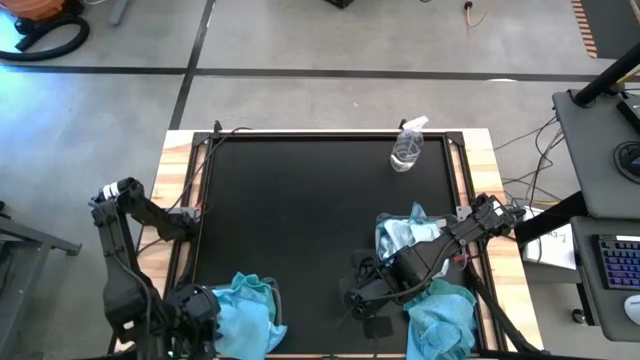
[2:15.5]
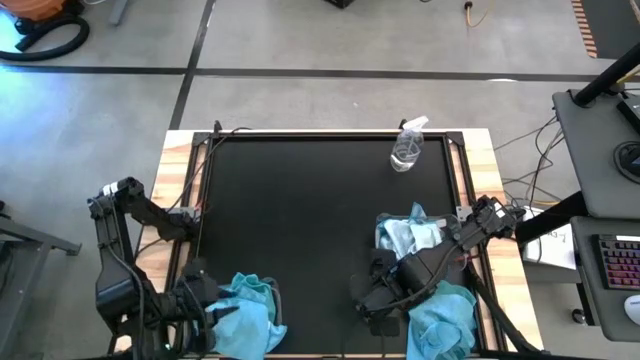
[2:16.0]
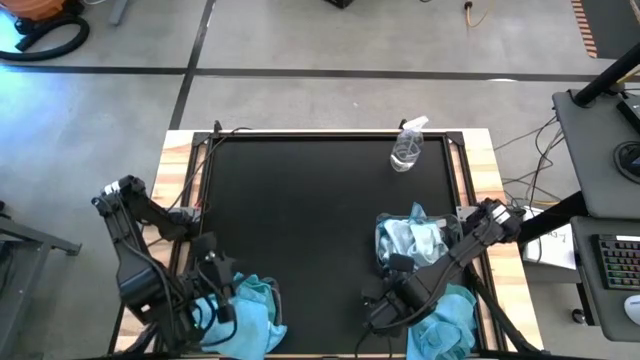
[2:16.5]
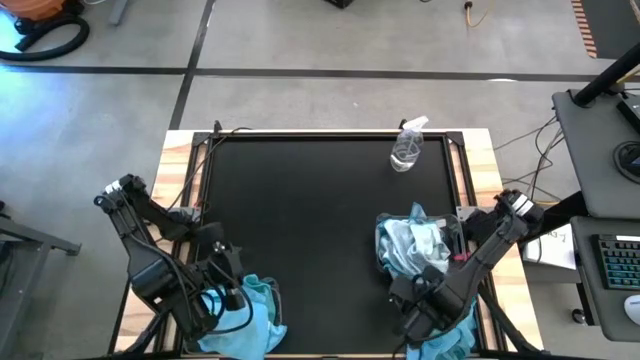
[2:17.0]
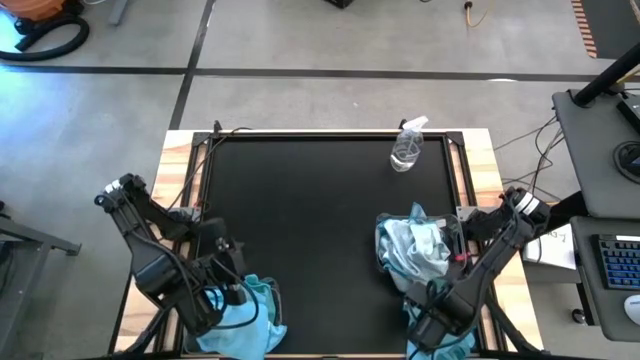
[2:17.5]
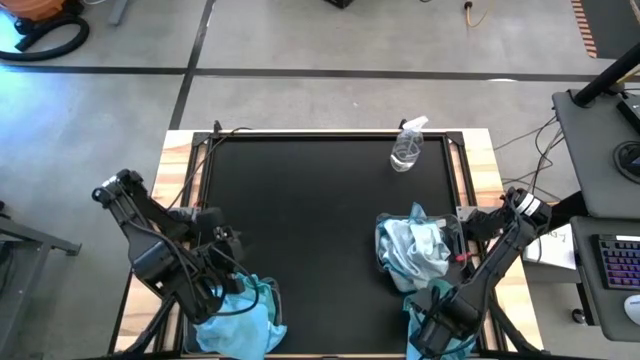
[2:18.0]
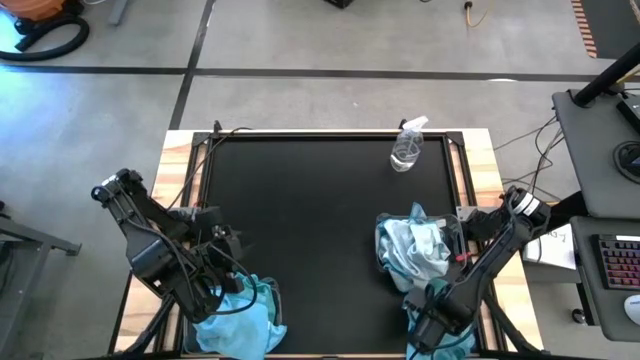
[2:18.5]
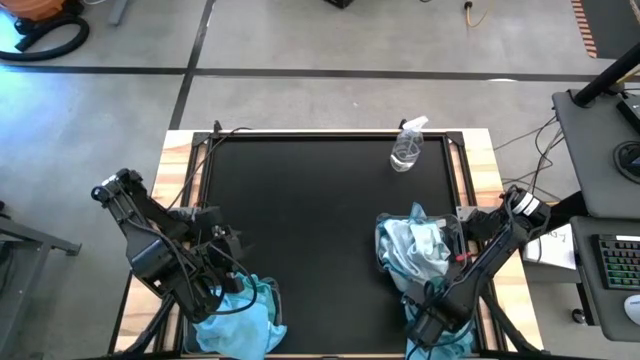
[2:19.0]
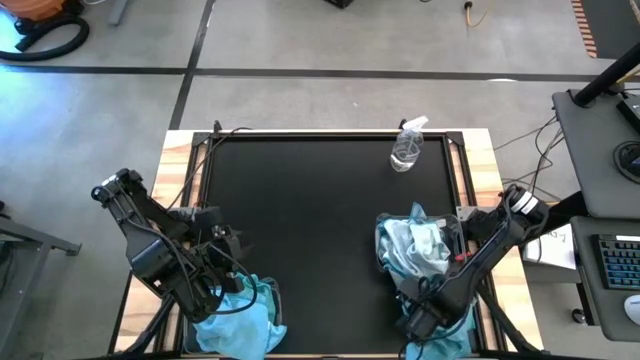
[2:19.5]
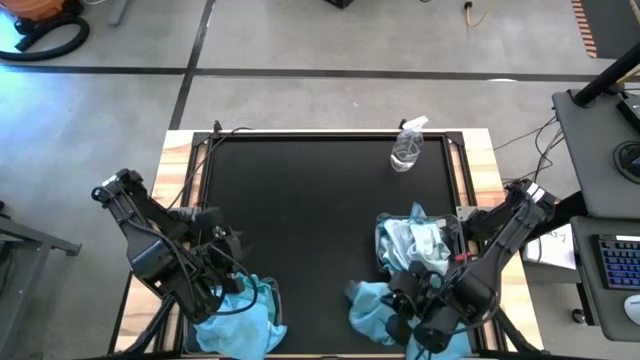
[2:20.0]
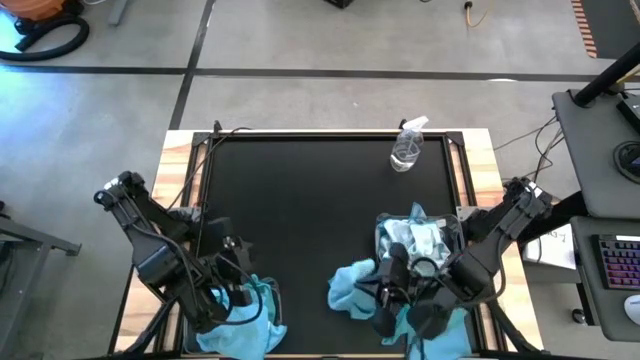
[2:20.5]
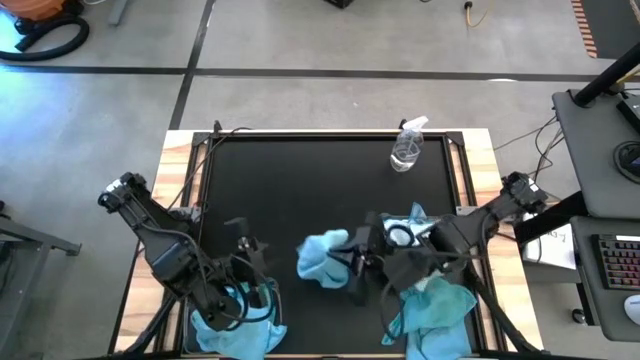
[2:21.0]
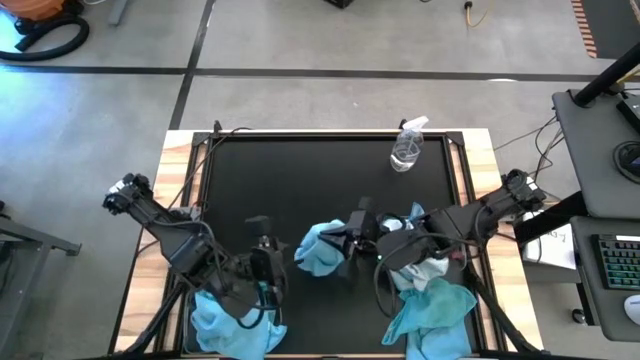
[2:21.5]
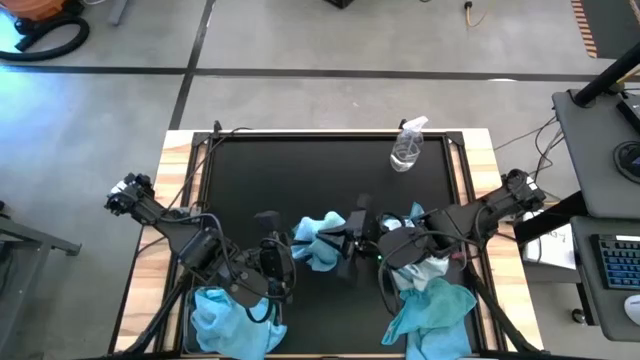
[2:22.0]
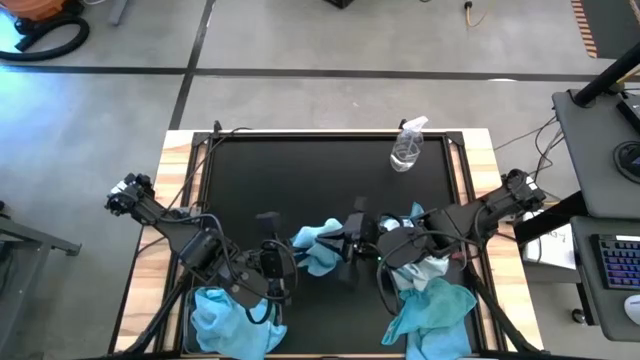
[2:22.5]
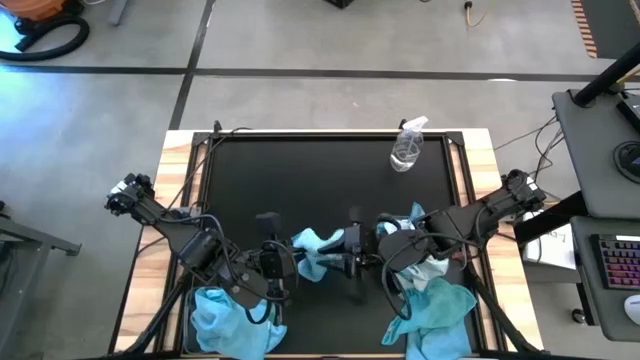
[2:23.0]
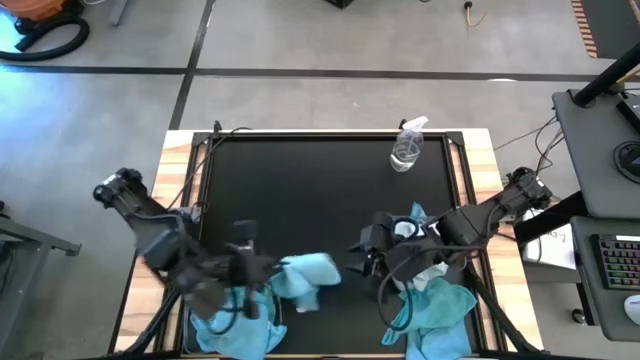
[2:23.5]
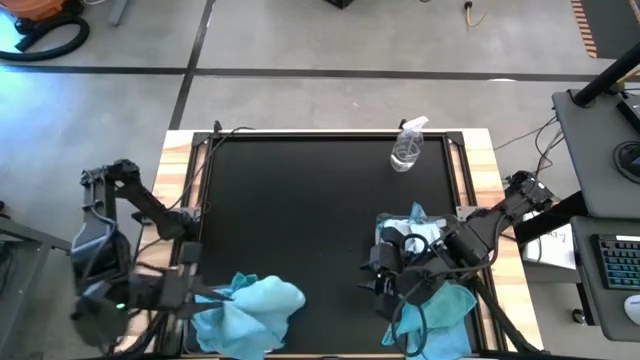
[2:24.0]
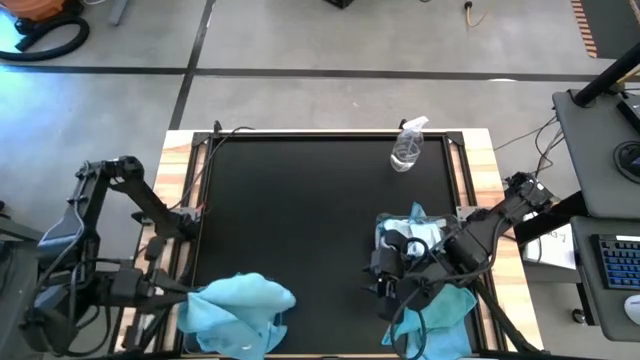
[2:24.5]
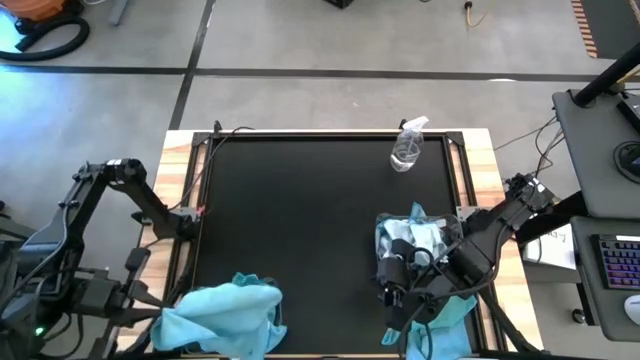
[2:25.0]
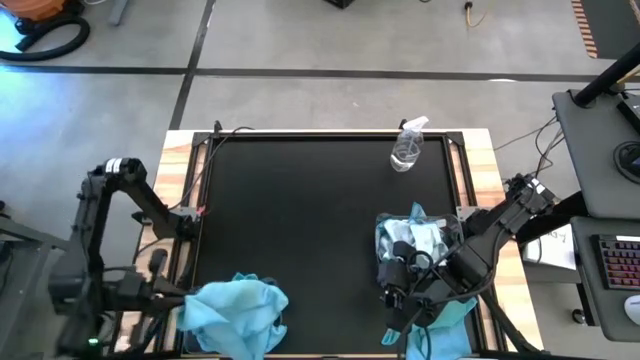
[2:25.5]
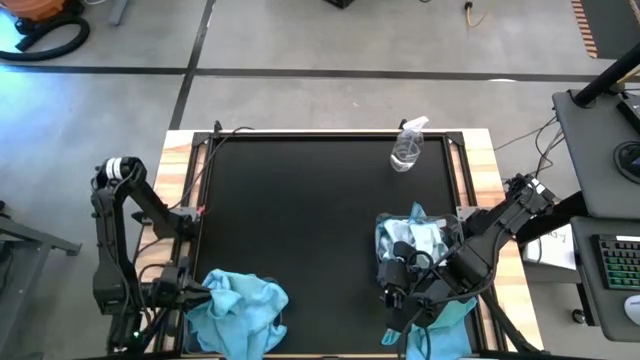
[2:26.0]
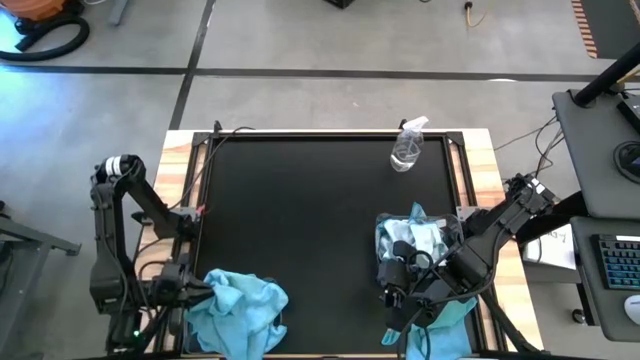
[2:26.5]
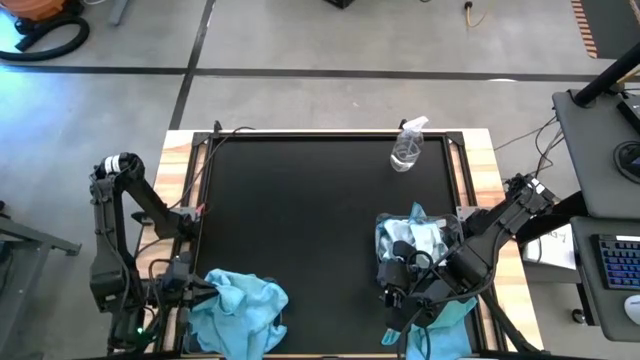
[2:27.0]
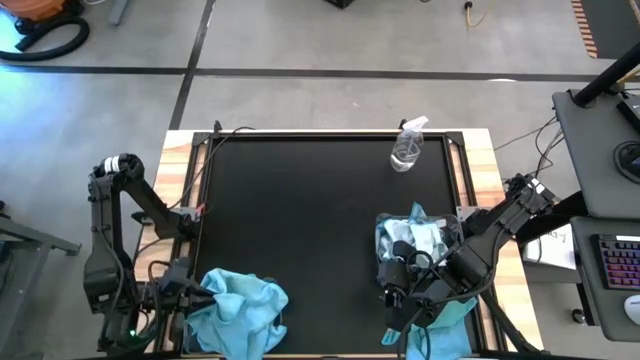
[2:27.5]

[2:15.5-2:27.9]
Task: Sort microfiber towel by color & place in baskets
Put the blue microfiber towel into the left transparent bin

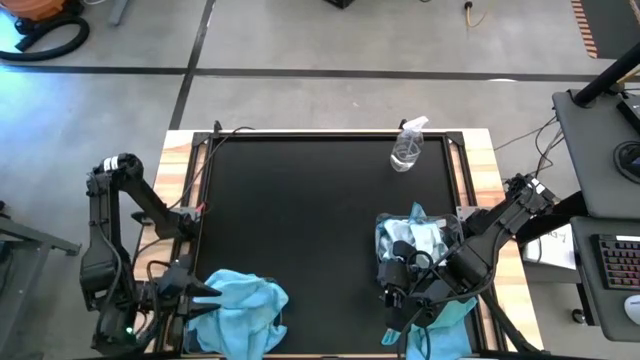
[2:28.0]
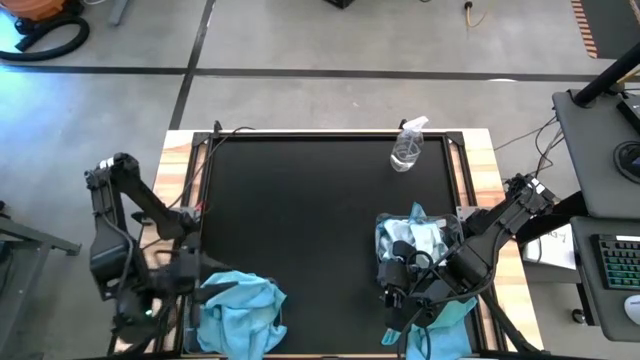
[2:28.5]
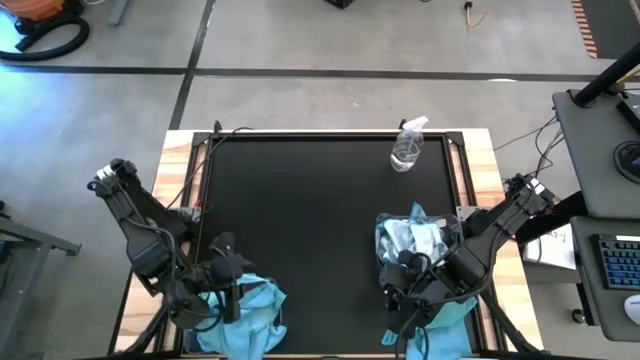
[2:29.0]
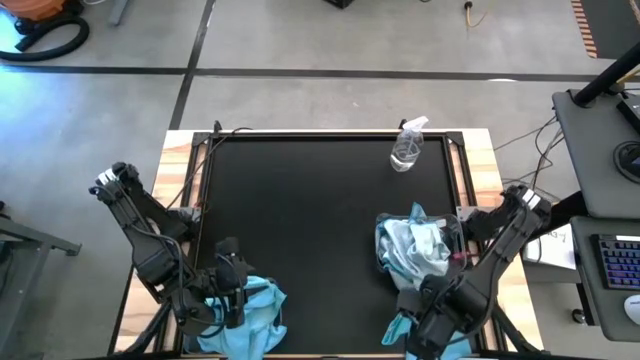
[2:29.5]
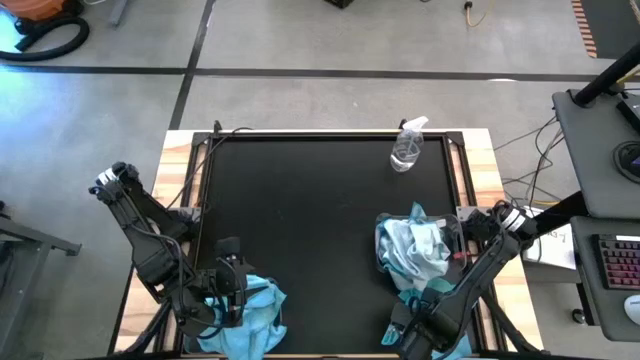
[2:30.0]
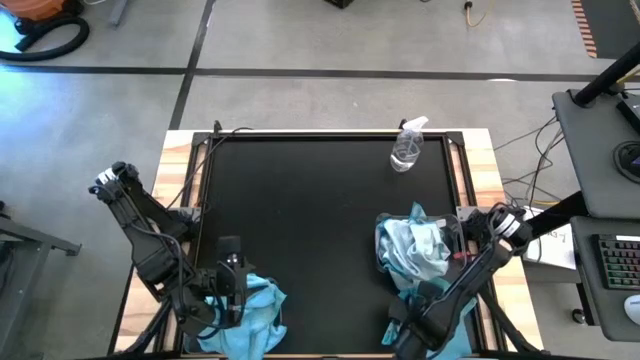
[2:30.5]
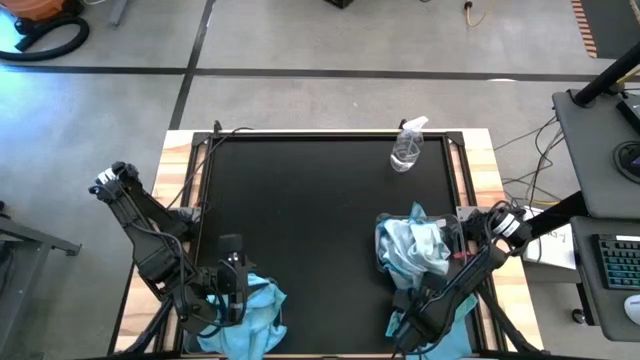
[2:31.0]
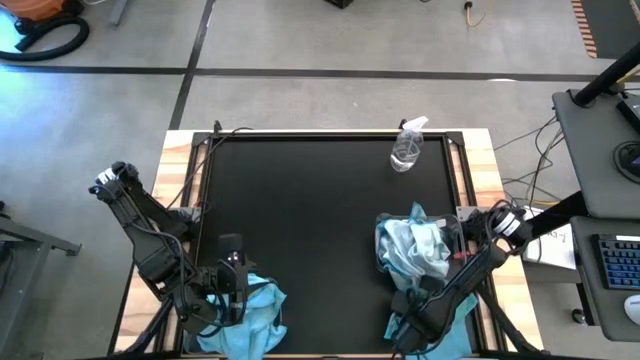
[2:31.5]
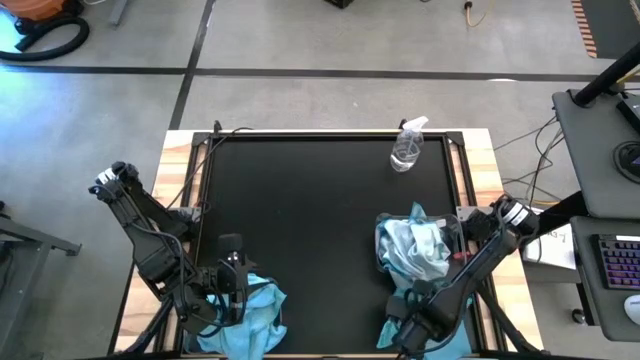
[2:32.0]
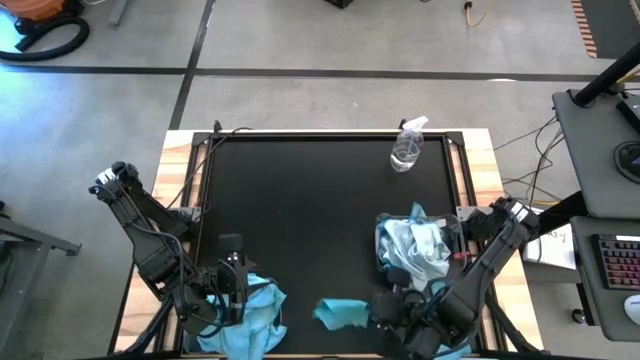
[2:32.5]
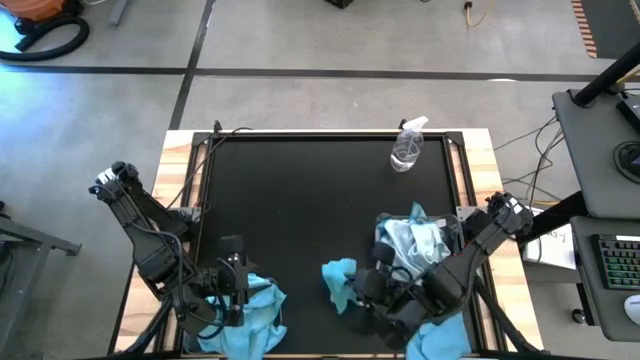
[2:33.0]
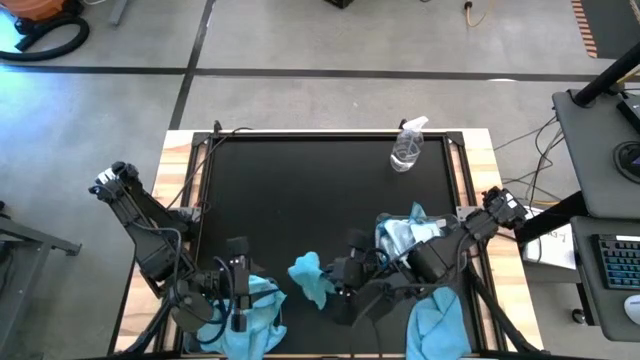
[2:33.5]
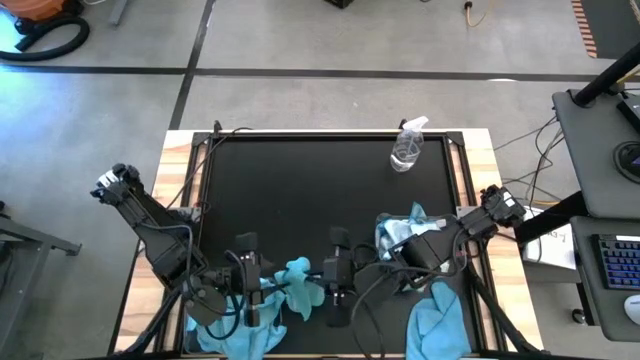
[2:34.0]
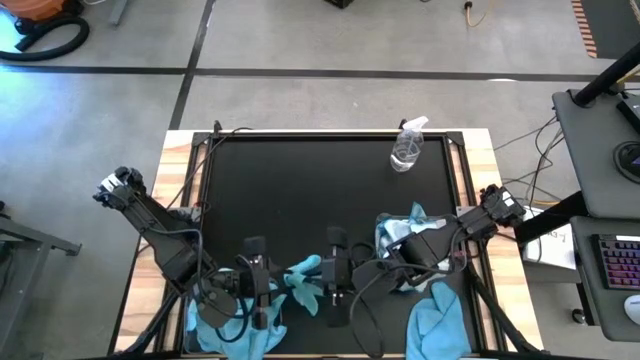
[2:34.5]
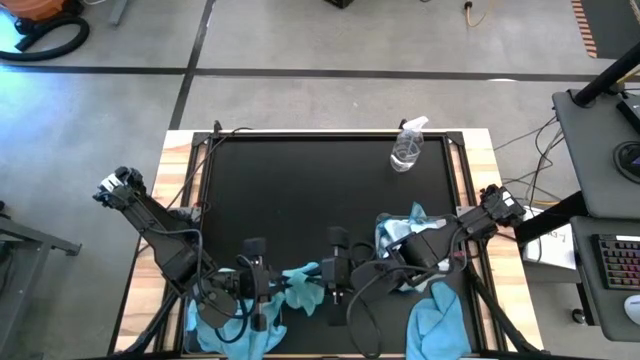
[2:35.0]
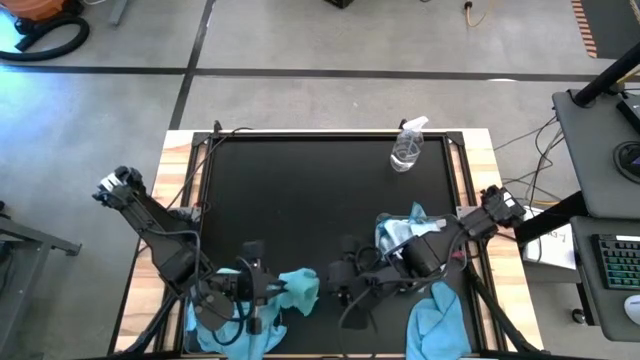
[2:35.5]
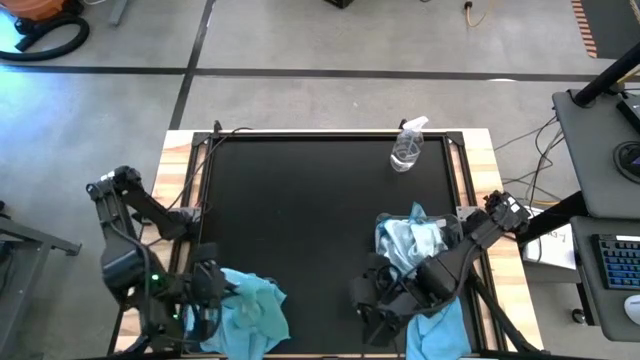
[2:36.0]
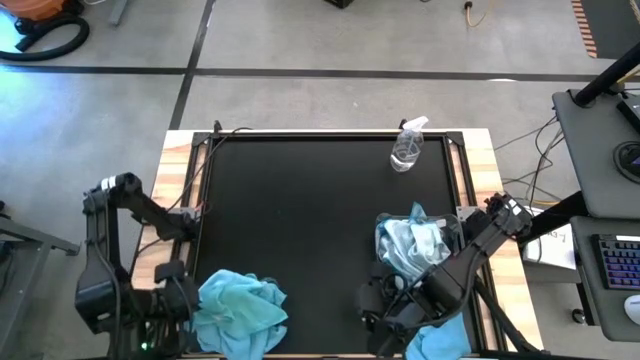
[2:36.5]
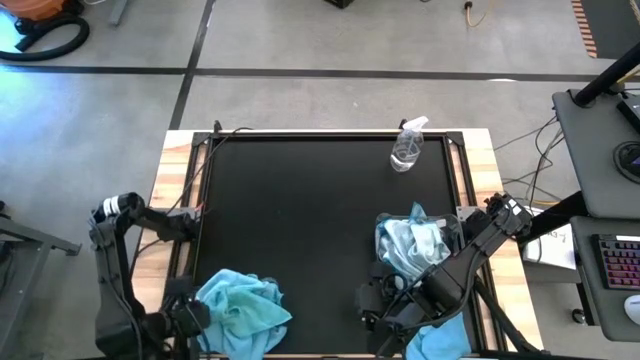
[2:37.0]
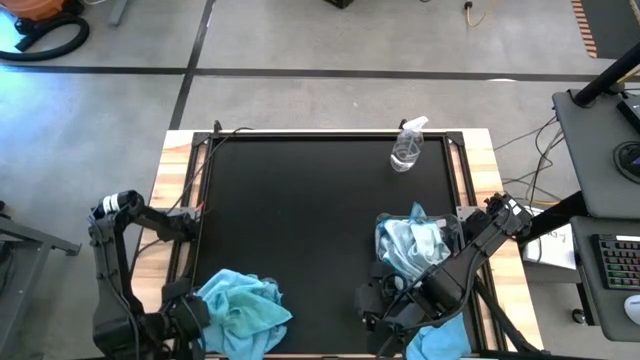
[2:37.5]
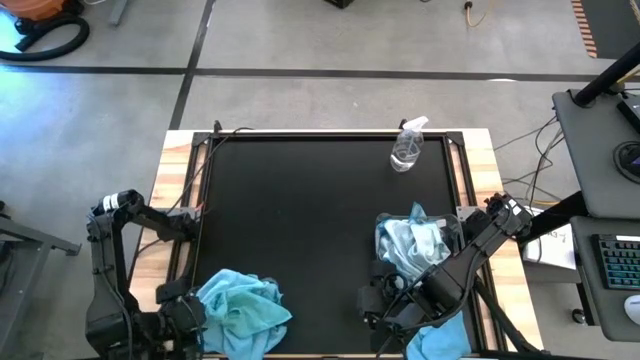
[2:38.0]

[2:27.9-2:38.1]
Put the blue microfiber towel into the left transparent bin
